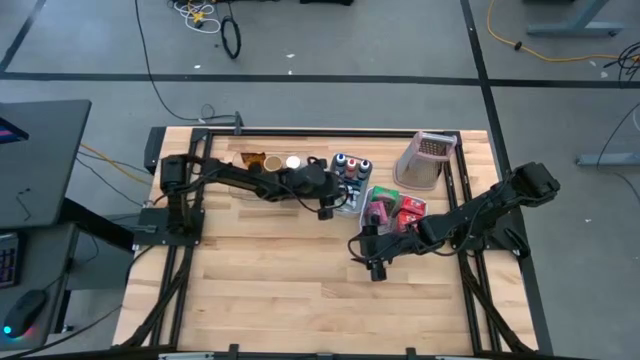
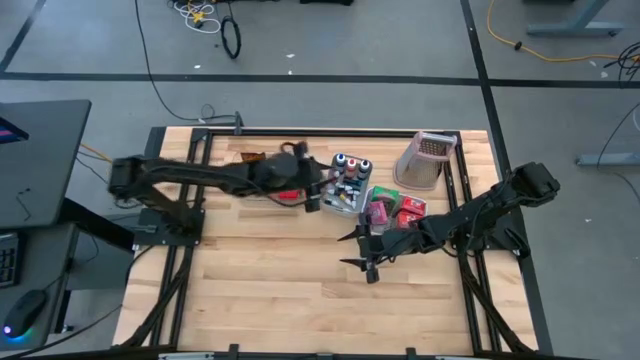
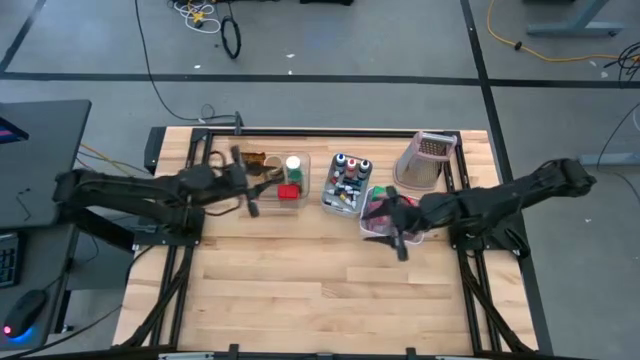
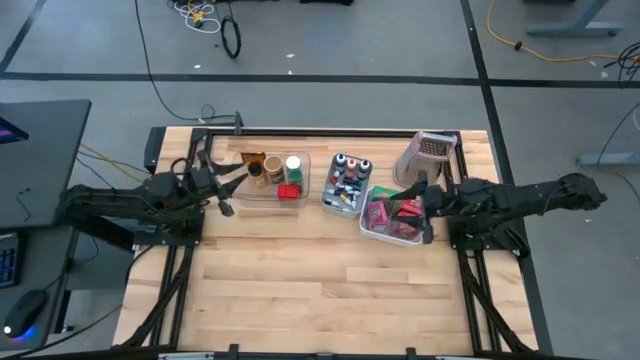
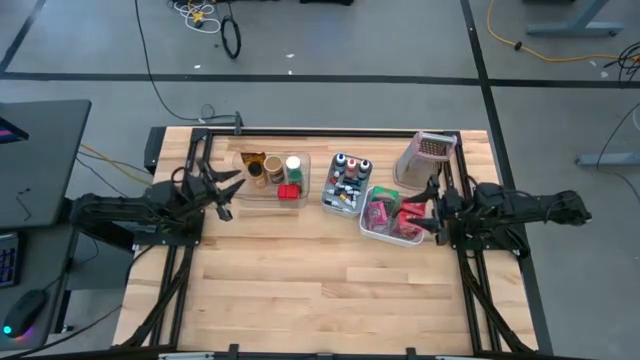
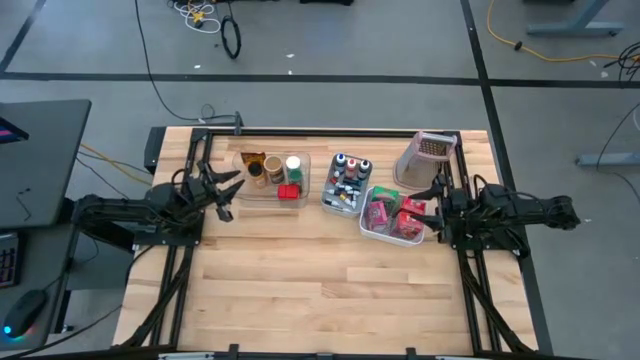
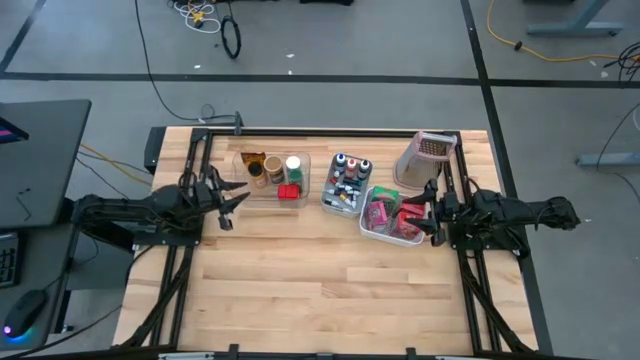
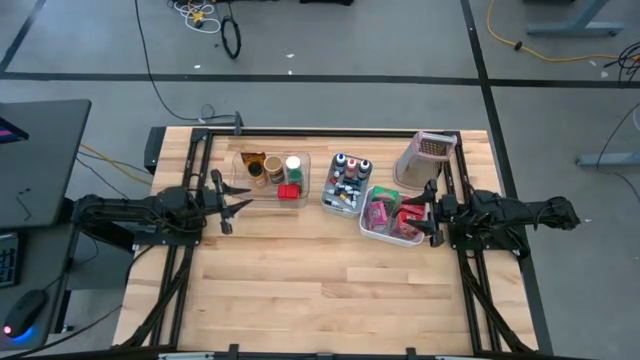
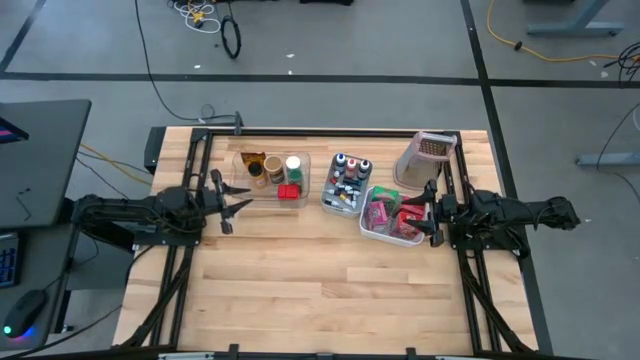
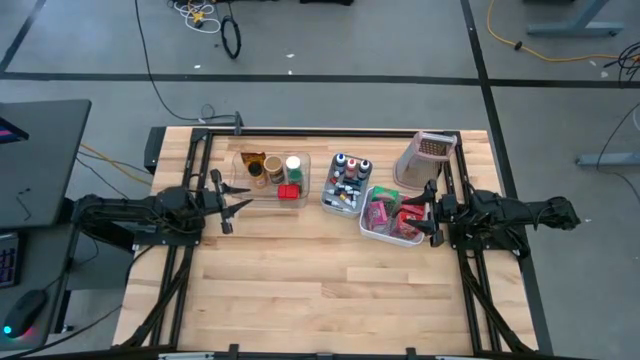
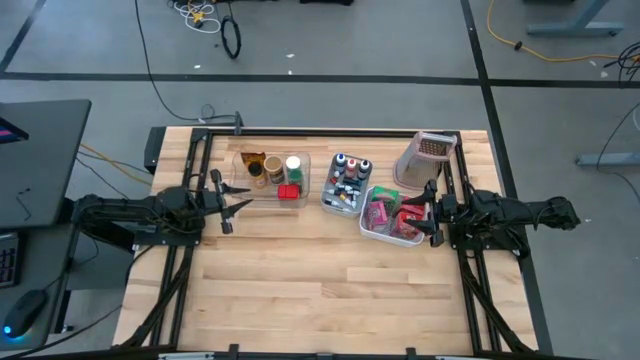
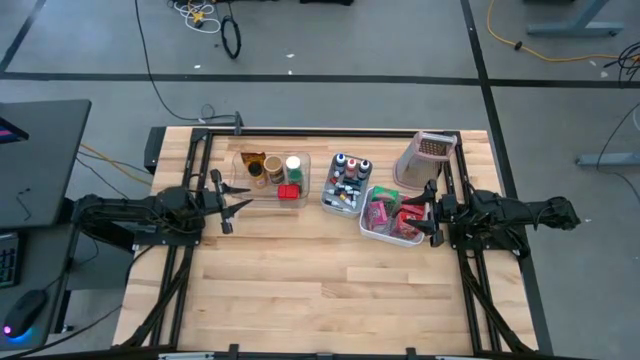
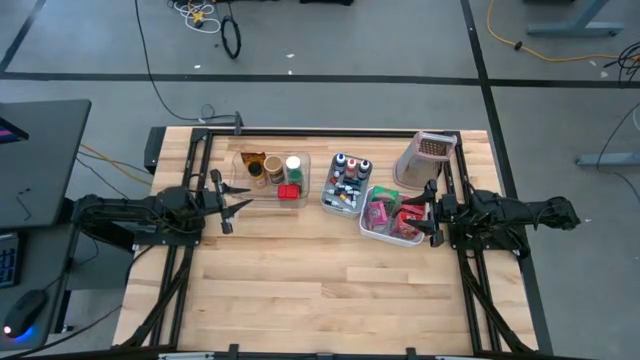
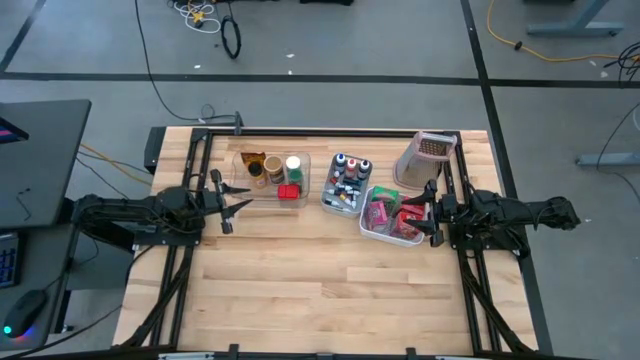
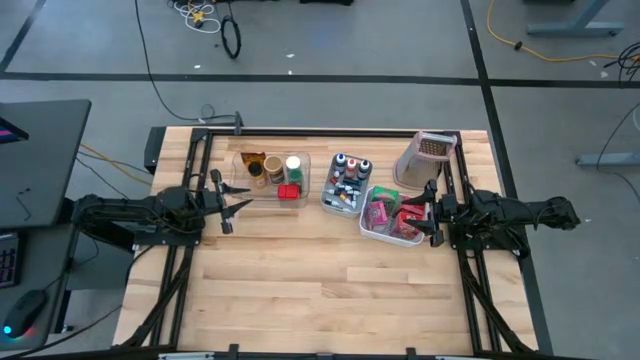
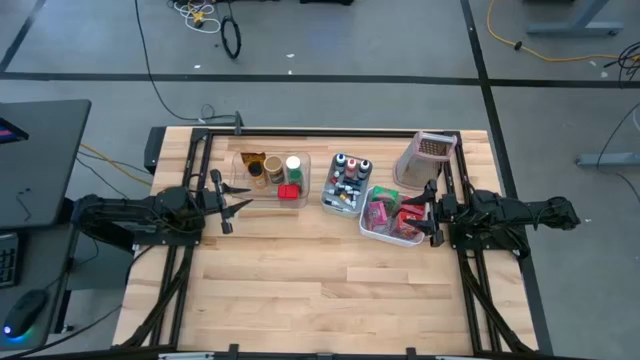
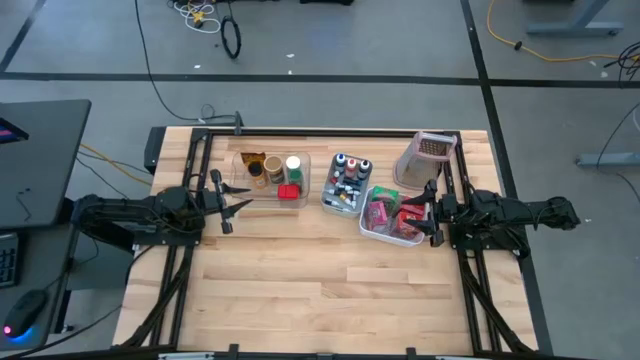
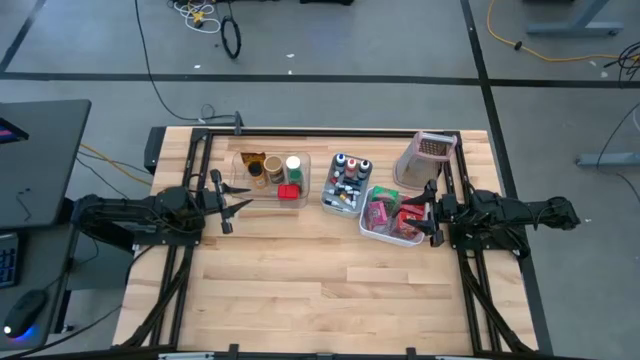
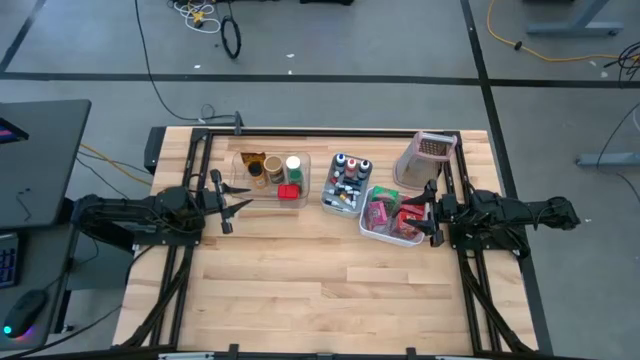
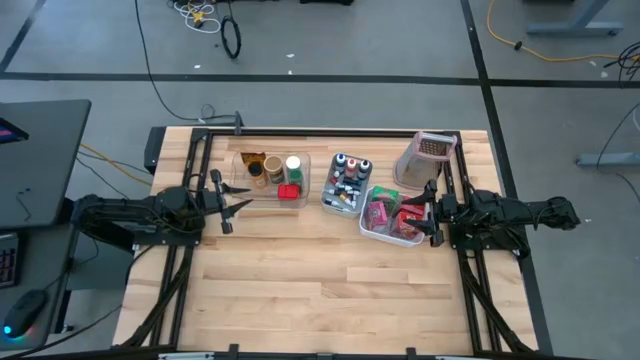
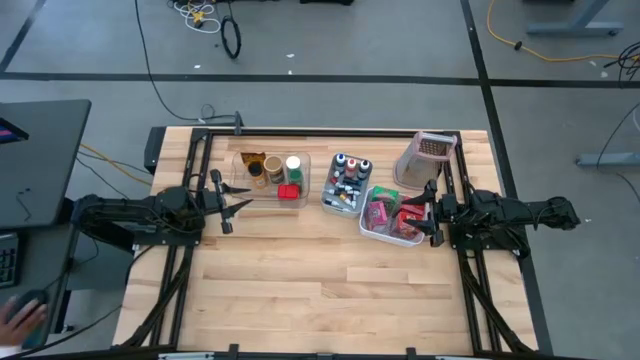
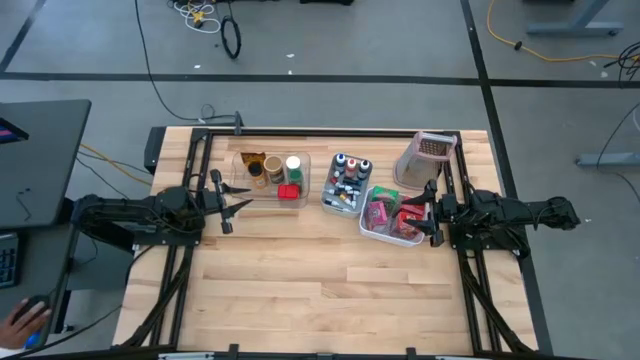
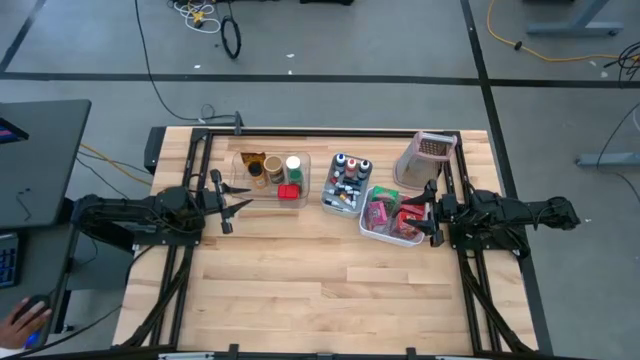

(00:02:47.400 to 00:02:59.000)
Task: Pick & Place Kitchen Items
Return to Home Position

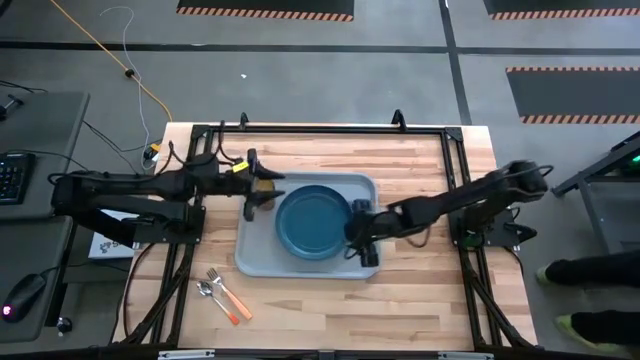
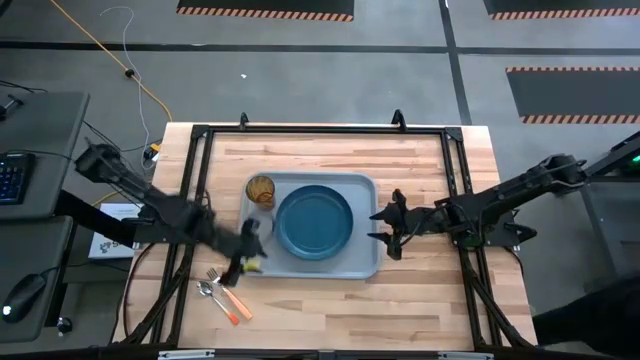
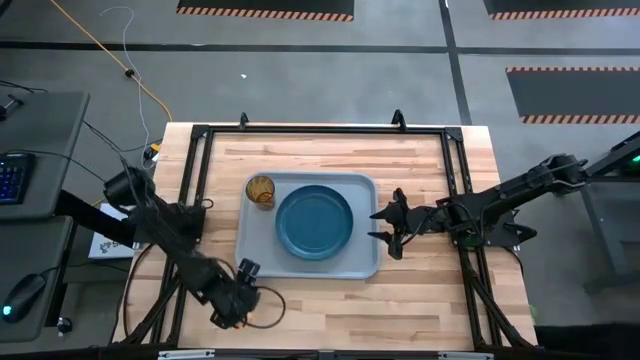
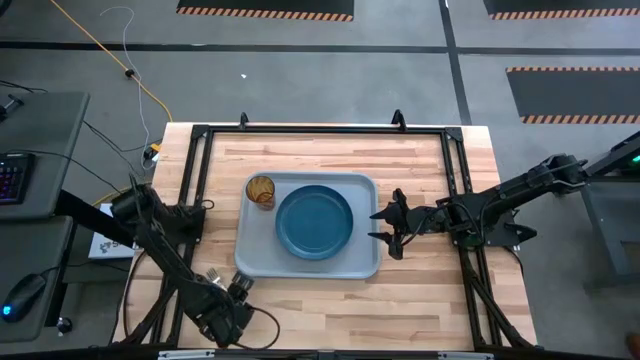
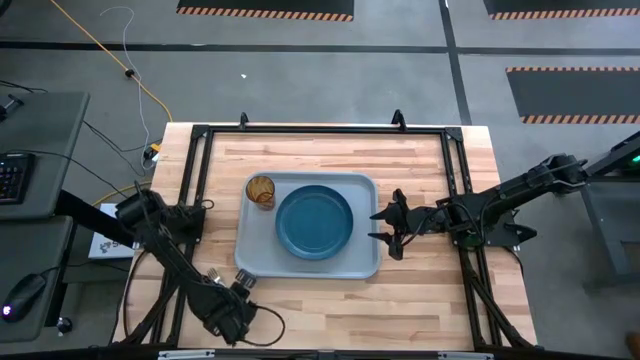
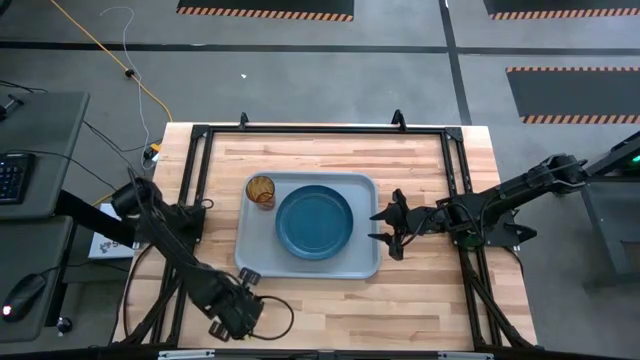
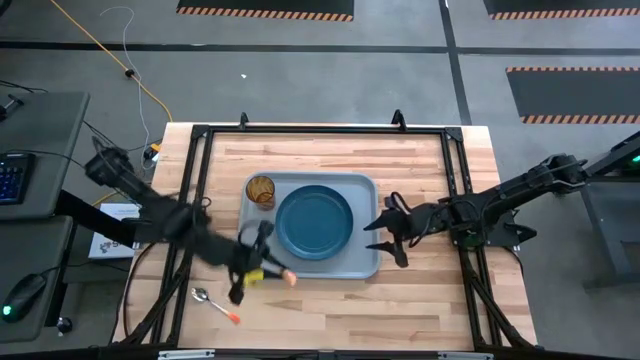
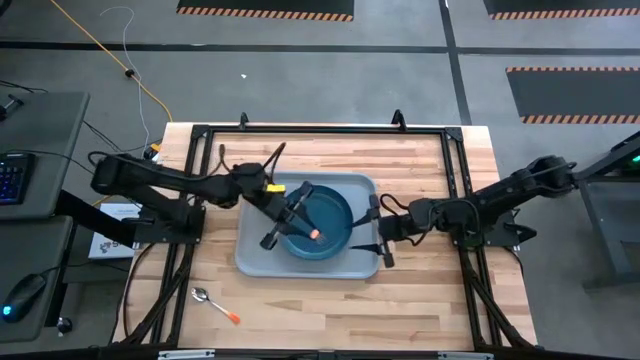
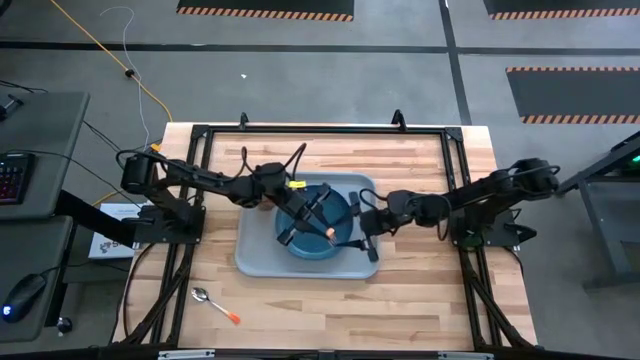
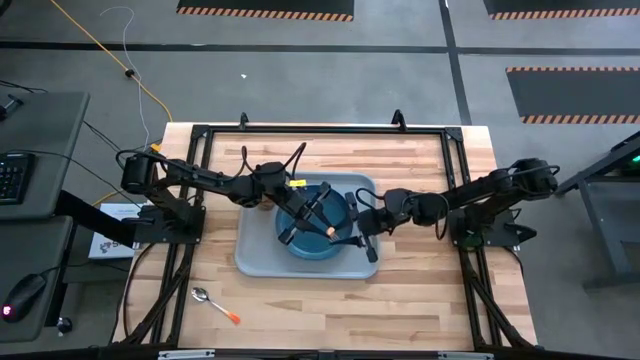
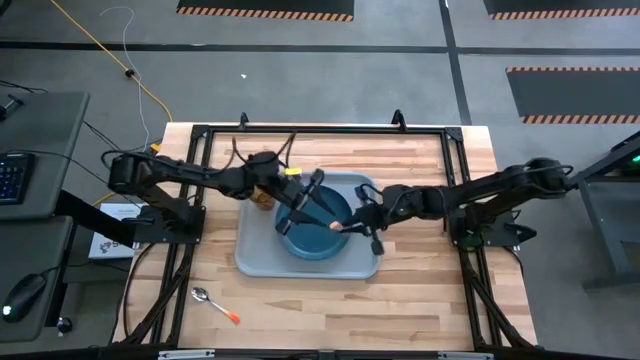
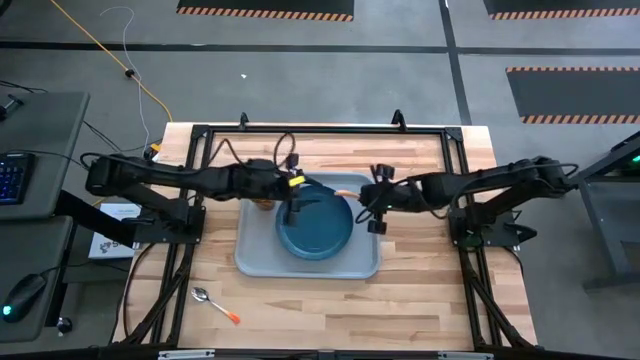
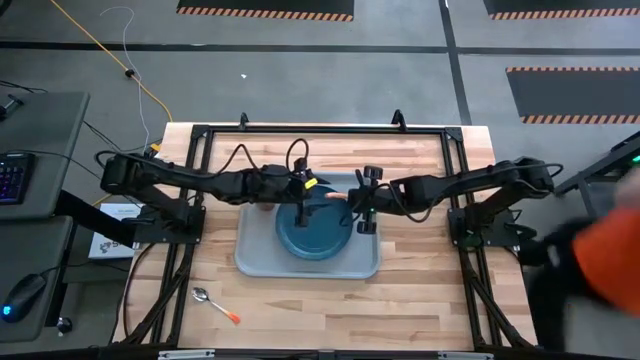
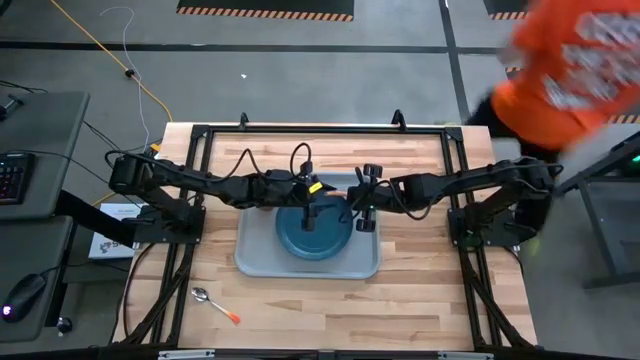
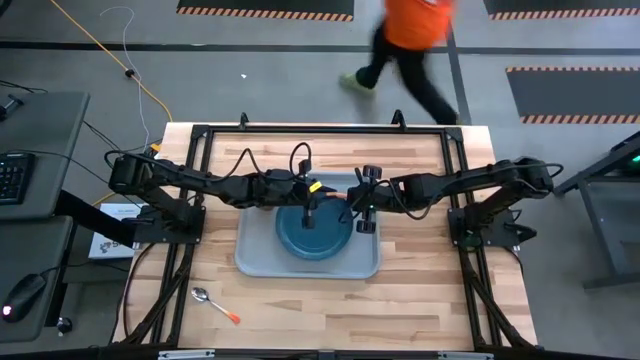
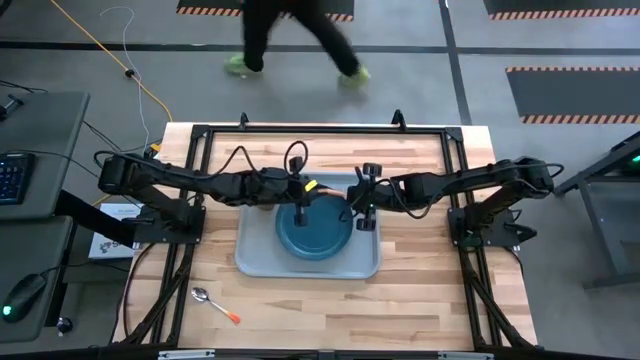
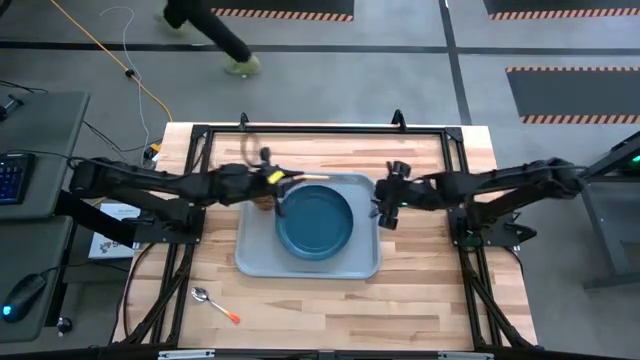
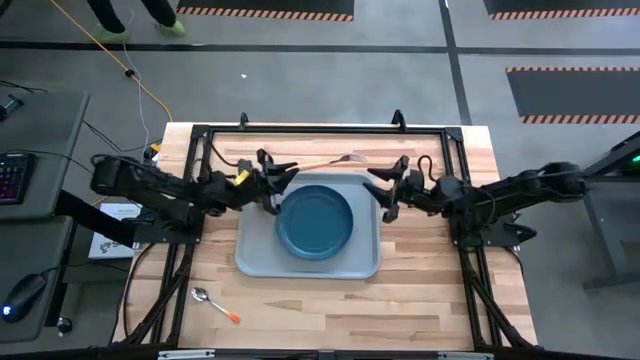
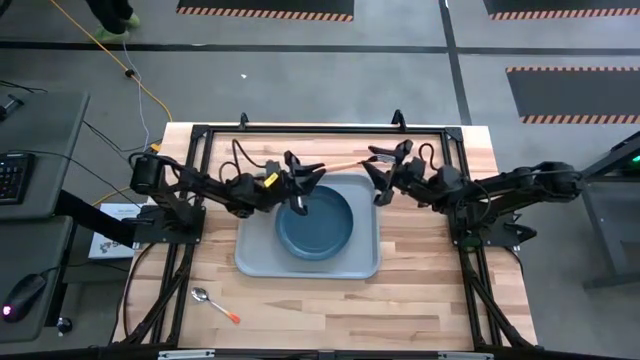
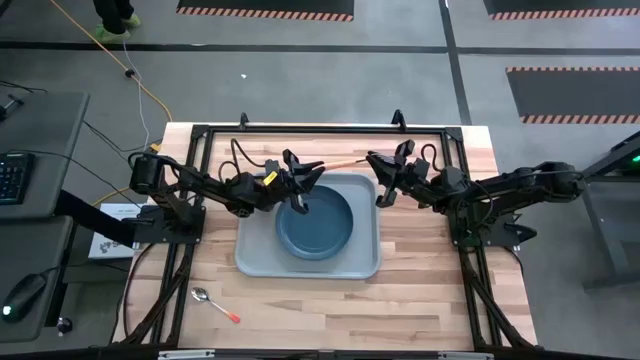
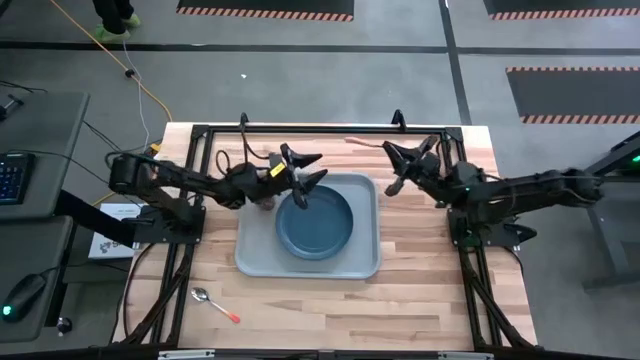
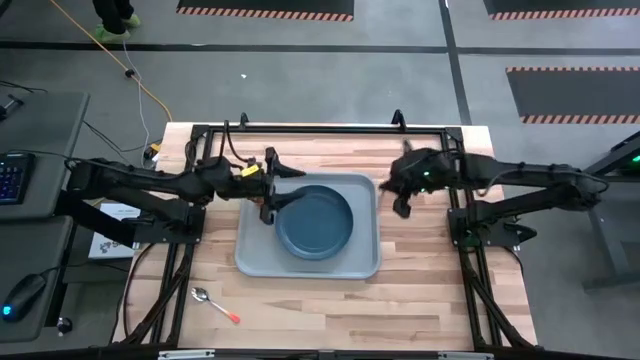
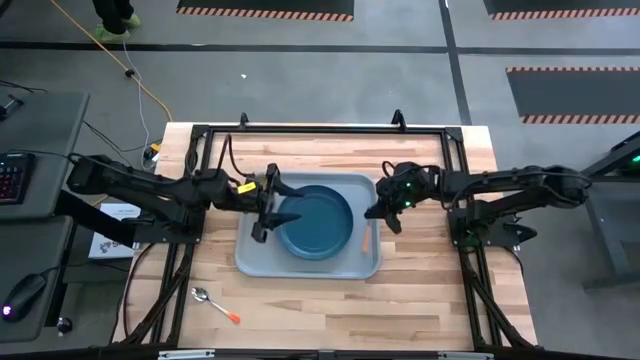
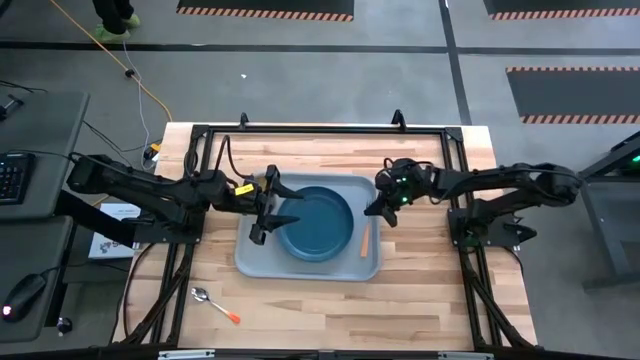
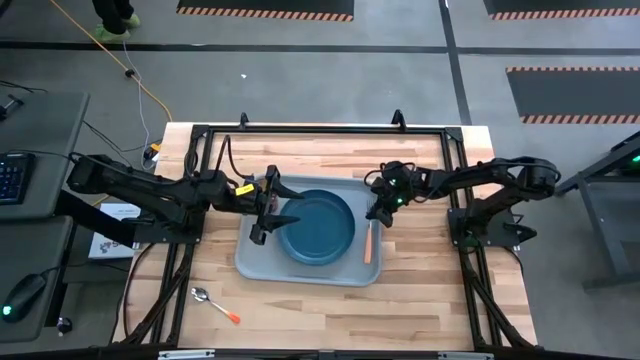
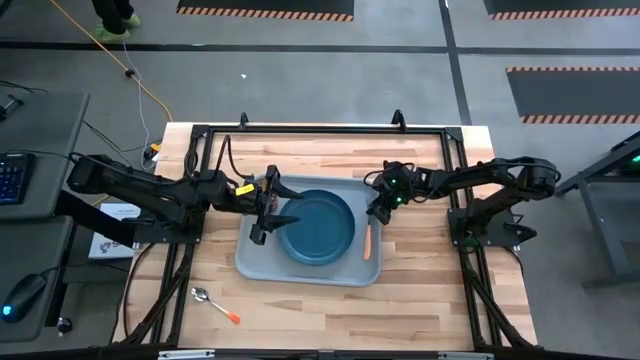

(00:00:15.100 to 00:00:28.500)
Task: Pick and place plate/cup/fork/spoon on tray
Put the orange fork on the blue tray to the right of the blue plate
